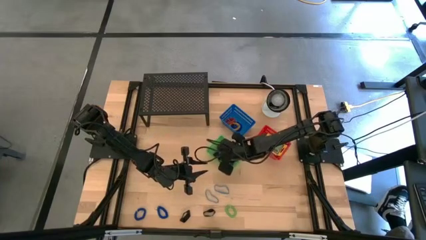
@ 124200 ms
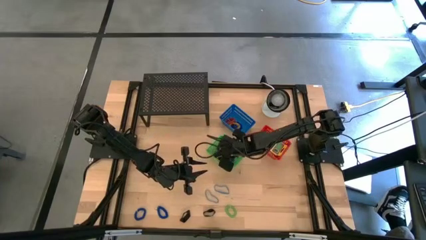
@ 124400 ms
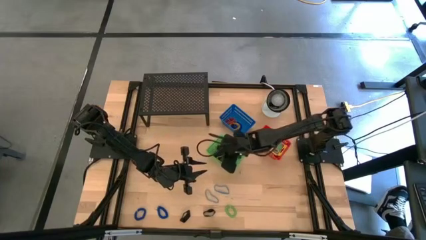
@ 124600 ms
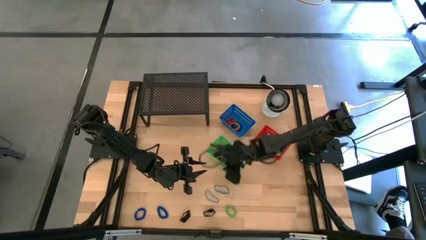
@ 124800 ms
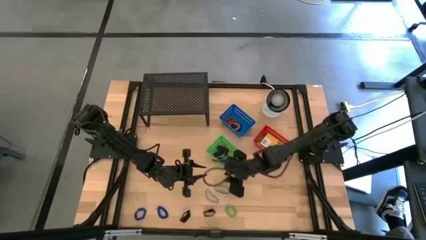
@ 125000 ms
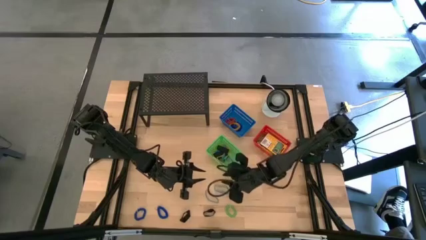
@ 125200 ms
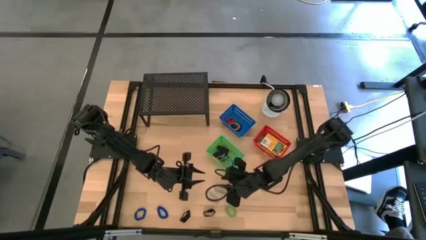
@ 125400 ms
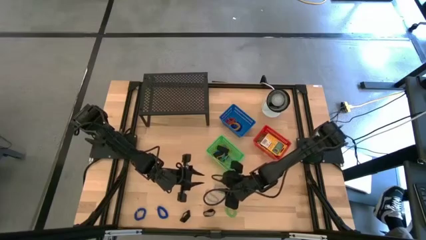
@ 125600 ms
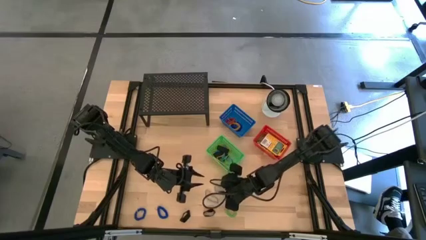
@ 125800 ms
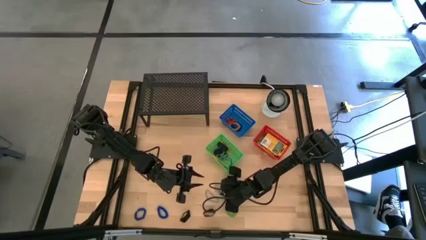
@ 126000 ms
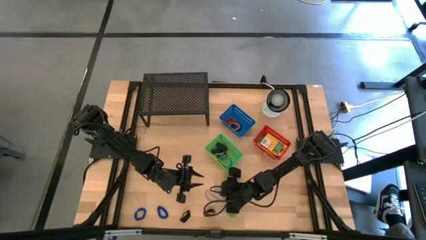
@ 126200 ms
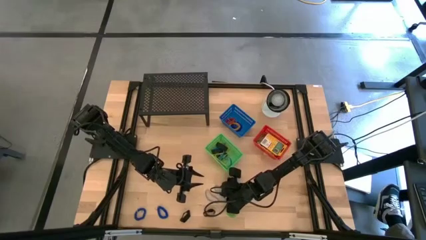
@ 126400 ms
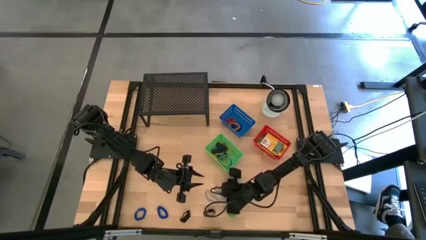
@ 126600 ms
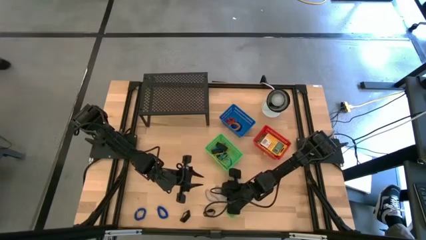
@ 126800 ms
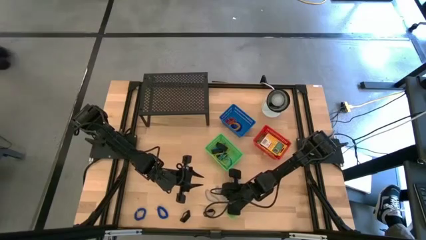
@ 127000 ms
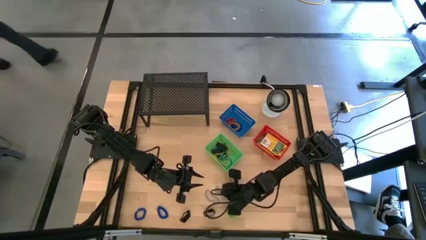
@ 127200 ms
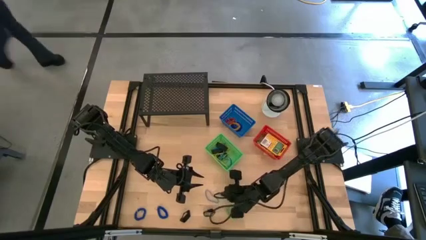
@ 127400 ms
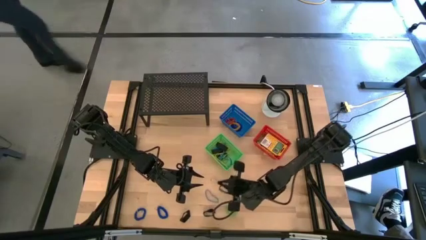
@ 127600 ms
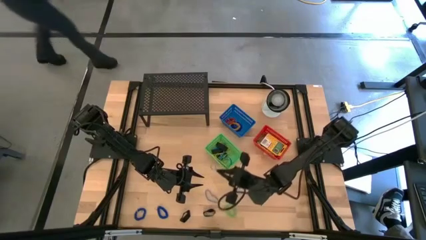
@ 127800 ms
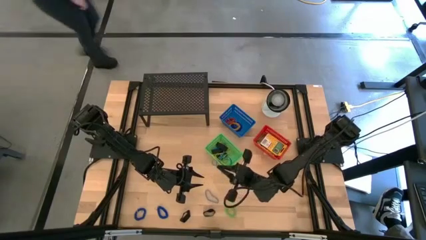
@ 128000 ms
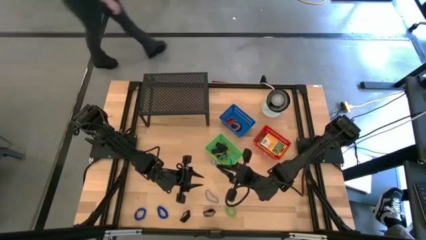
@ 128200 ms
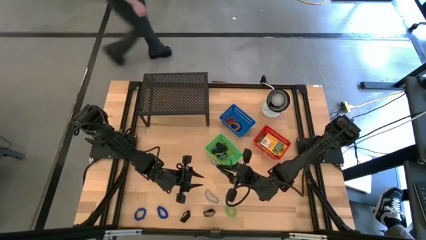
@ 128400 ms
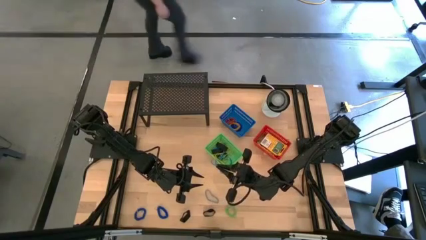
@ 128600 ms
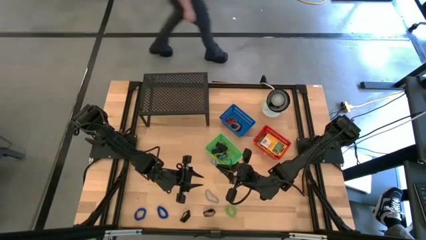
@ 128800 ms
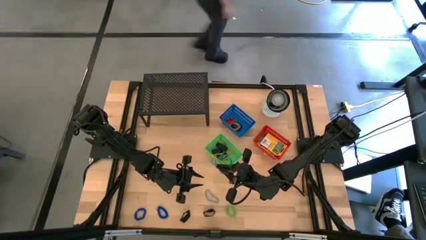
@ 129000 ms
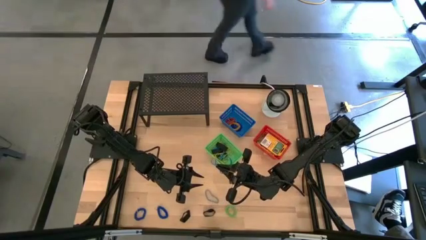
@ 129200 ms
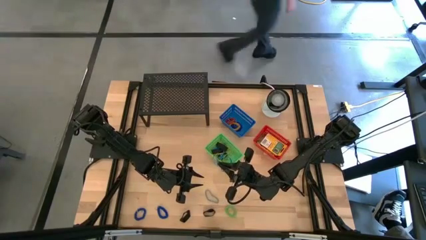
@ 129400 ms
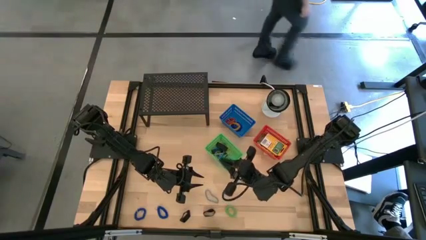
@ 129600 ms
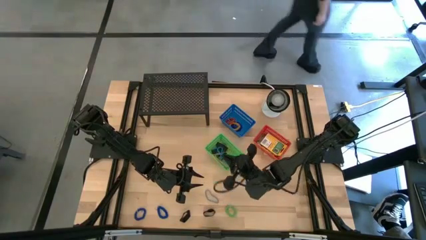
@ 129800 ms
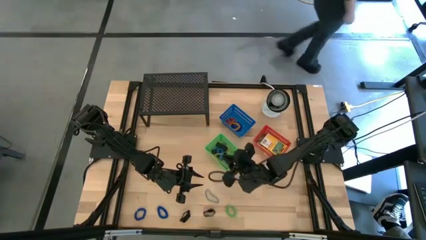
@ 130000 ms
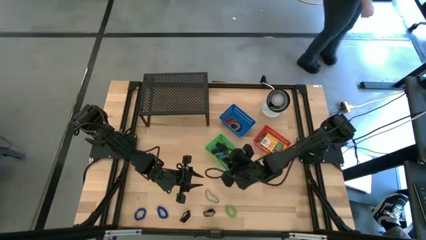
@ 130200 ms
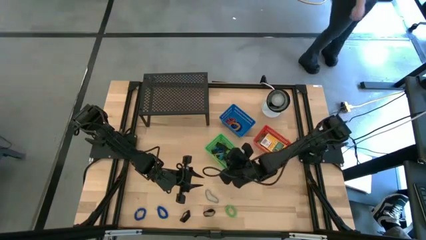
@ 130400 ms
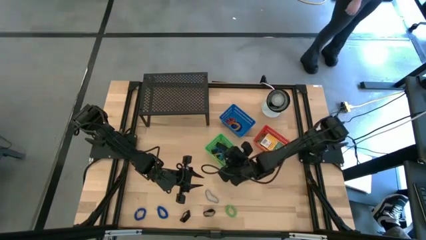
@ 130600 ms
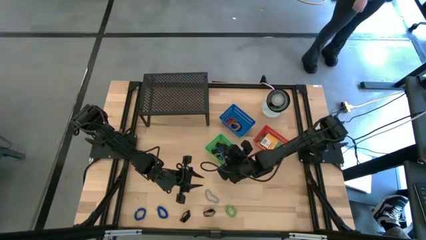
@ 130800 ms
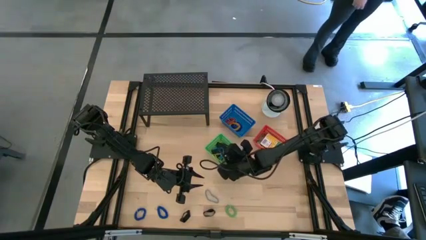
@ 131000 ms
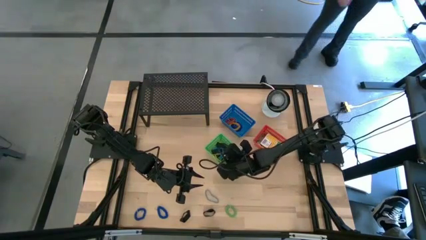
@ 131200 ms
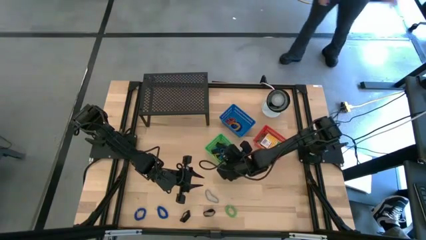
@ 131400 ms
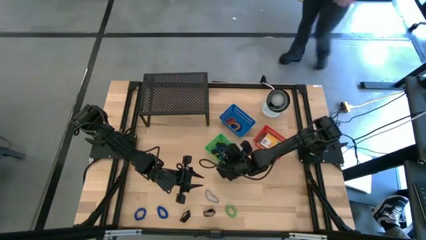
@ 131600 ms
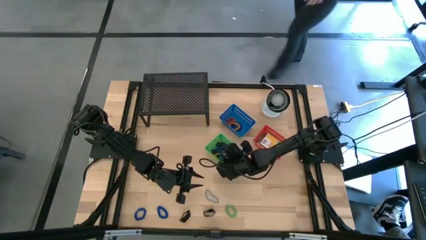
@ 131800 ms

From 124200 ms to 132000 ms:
Task: Pick & Place Office Desk Supplies
Put the blue rubber band into the blue basket

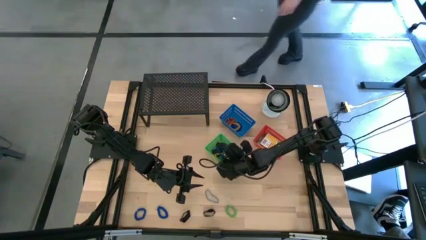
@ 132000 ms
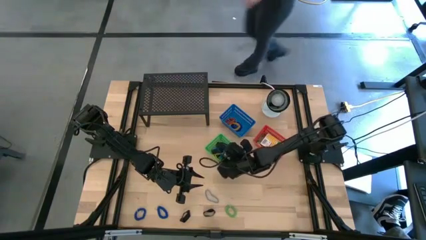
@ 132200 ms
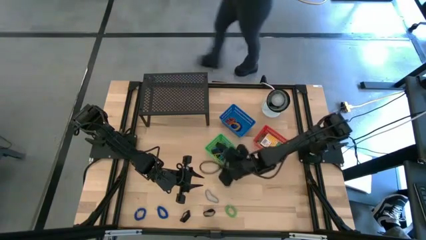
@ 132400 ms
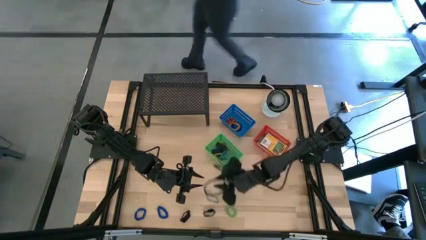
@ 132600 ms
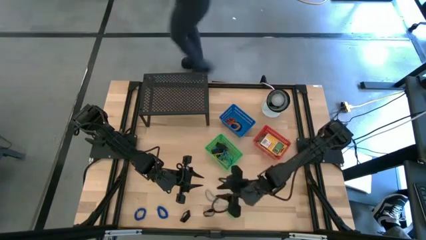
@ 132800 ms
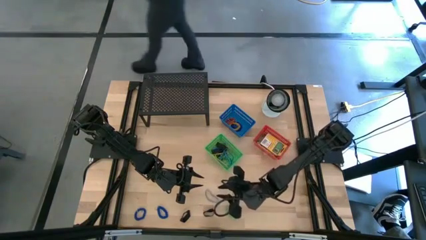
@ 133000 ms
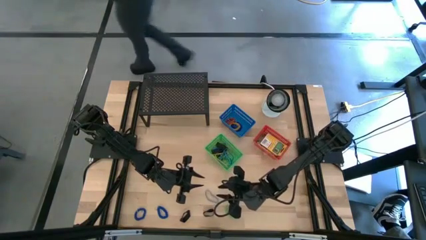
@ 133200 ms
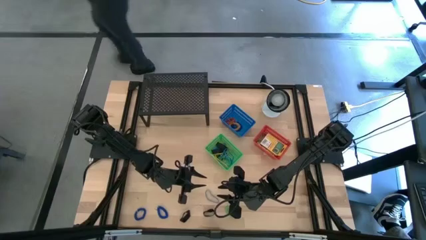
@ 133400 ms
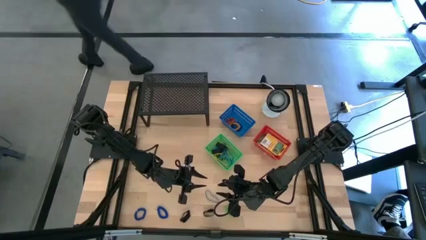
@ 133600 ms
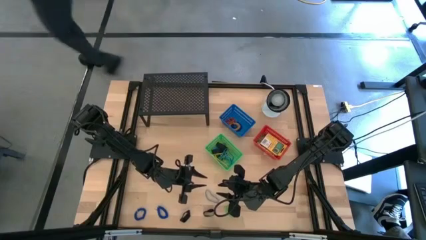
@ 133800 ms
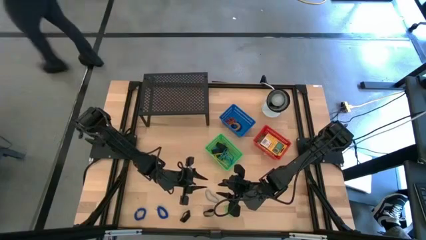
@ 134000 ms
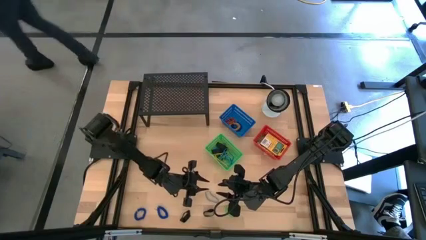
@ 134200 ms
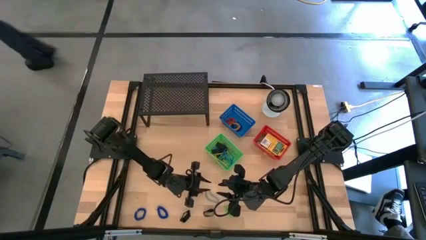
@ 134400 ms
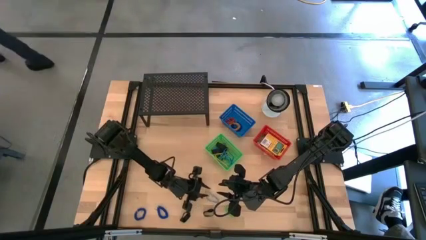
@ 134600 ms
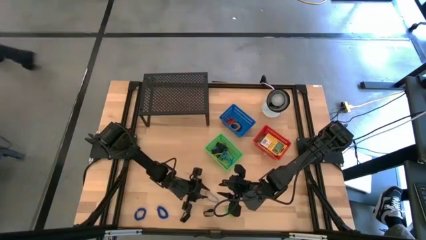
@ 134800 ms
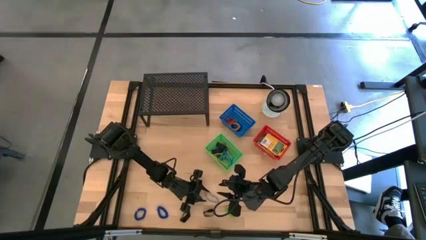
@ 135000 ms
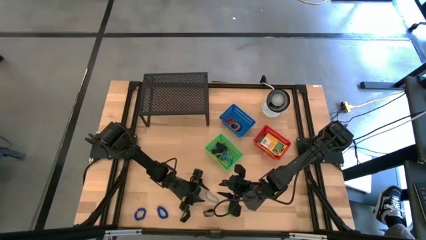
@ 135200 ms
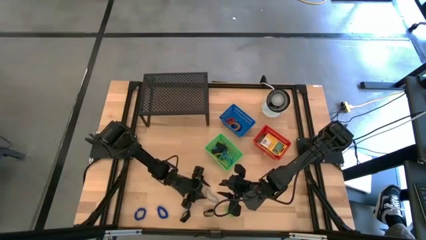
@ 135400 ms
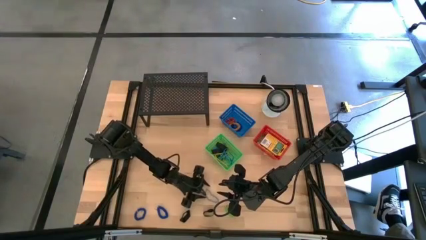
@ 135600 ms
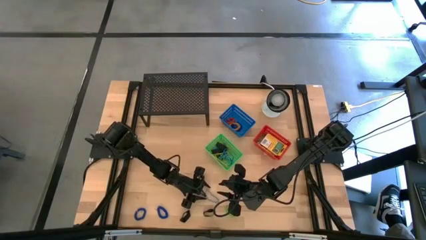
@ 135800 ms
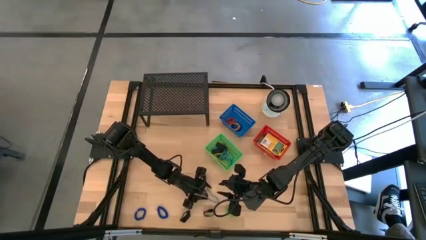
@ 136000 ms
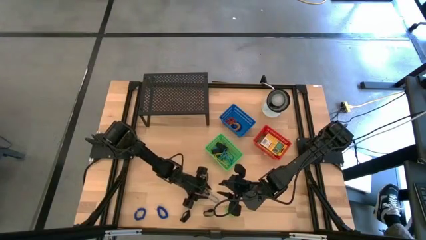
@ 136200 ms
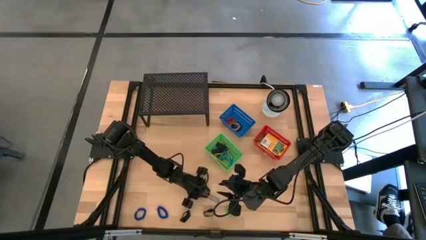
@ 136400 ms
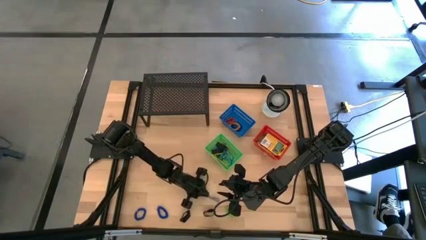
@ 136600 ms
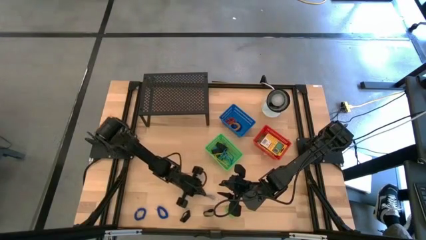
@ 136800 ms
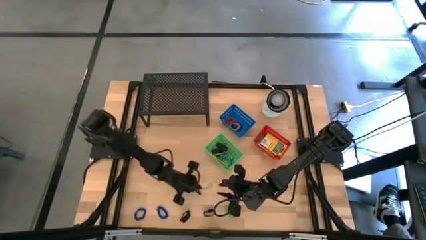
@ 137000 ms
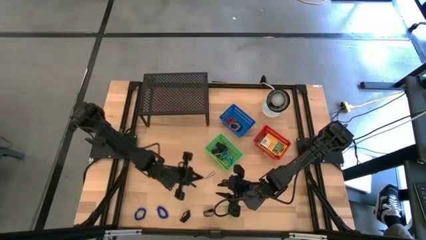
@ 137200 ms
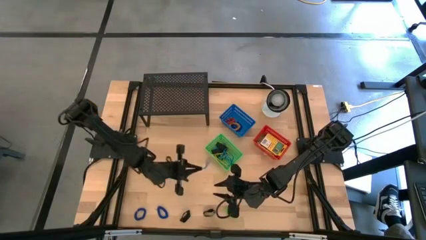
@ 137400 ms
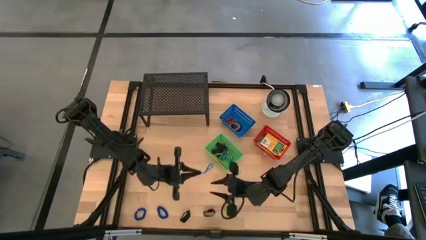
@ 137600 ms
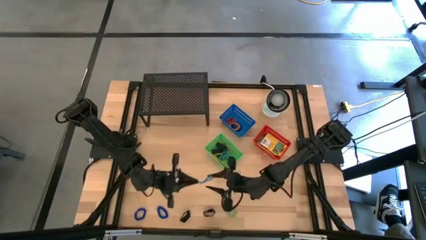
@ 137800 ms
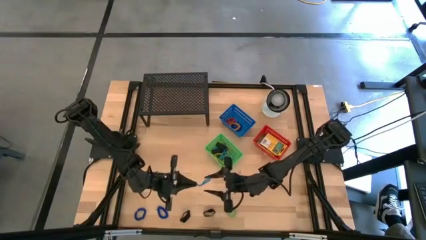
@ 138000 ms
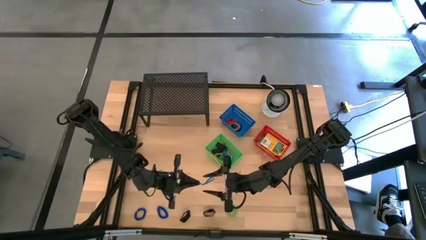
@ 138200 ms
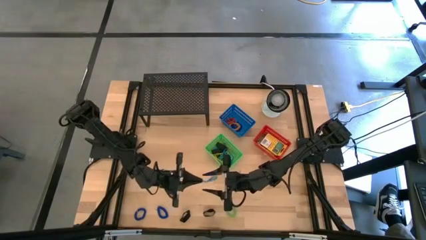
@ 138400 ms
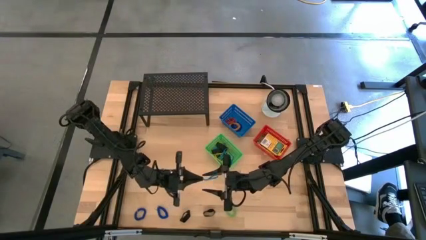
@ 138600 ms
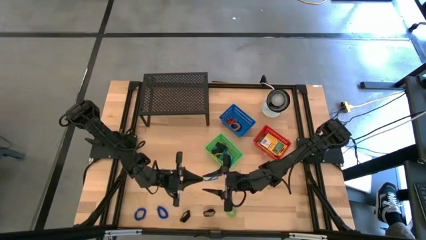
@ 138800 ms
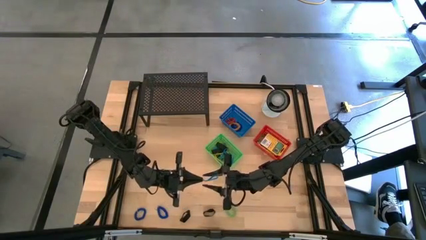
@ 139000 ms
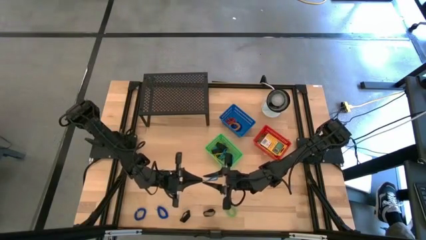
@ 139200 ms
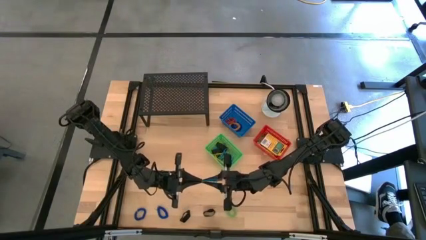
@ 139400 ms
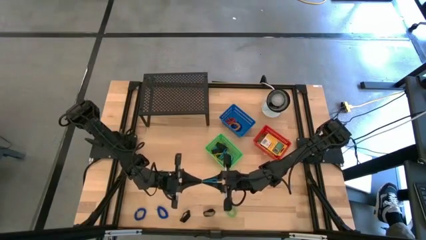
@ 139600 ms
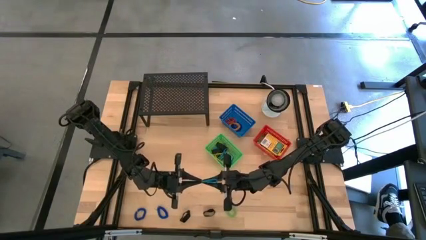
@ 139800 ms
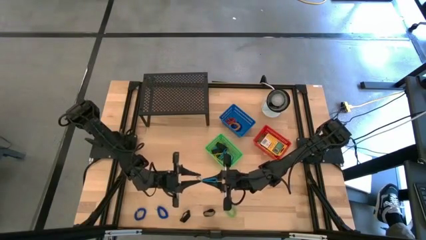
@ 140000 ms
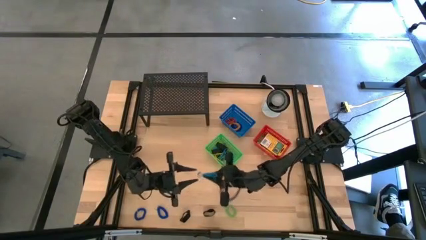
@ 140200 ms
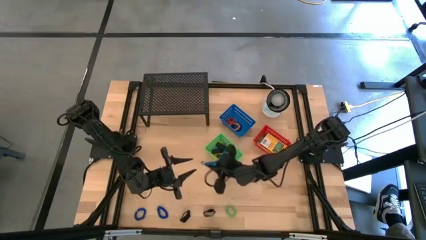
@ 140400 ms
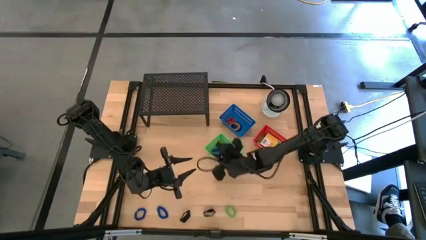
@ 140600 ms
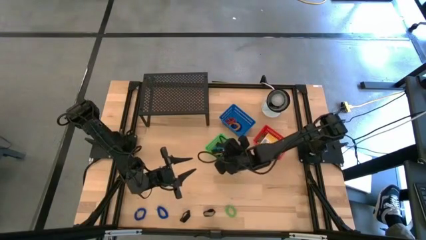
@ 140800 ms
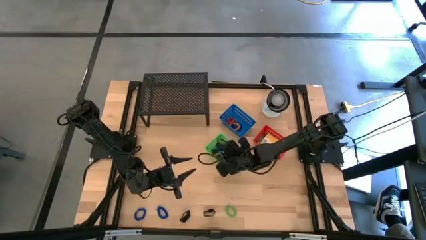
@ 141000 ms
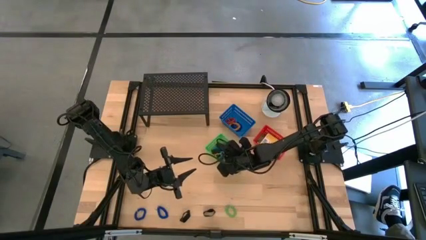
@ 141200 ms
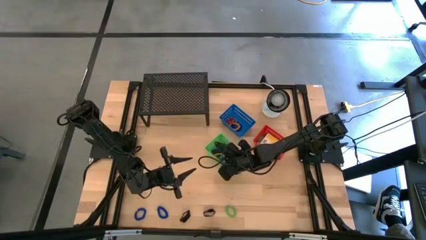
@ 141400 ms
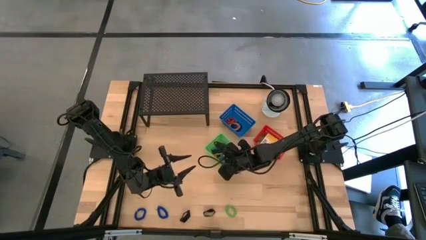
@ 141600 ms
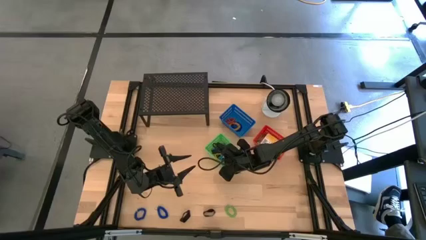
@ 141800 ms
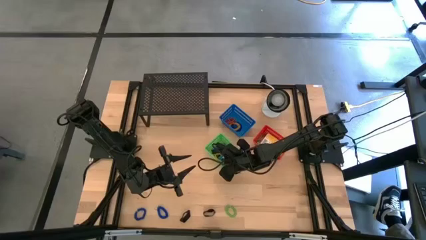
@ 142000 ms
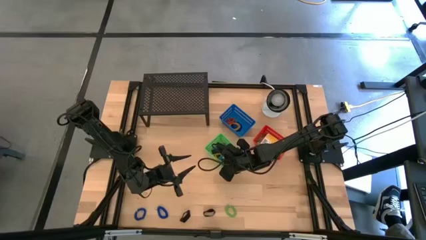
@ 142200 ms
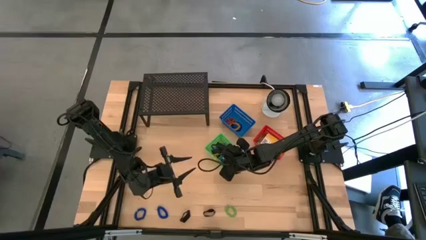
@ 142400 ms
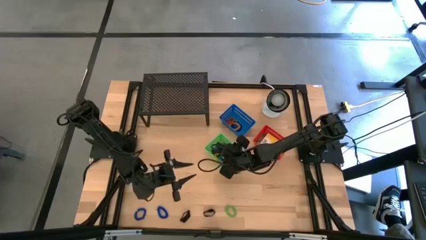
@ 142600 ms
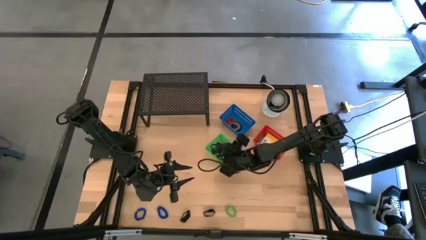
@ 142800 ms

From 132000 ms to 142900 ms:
Put the blue rubber band into the green basket
